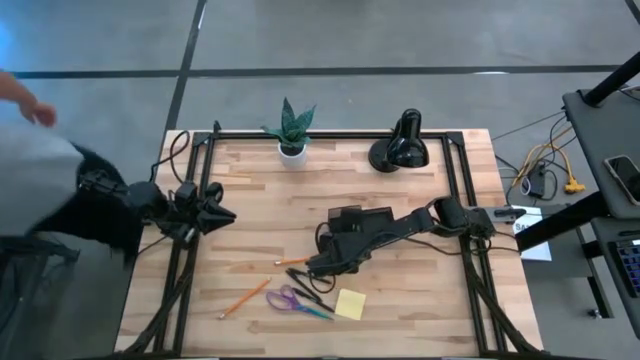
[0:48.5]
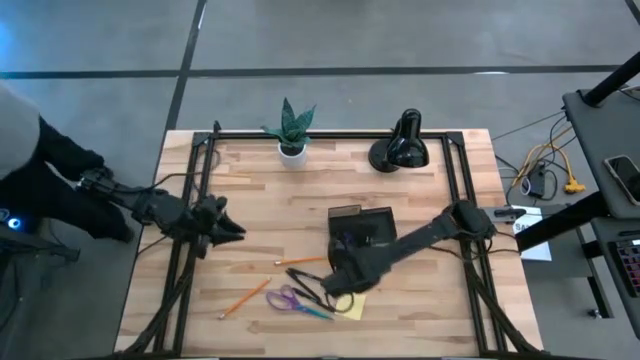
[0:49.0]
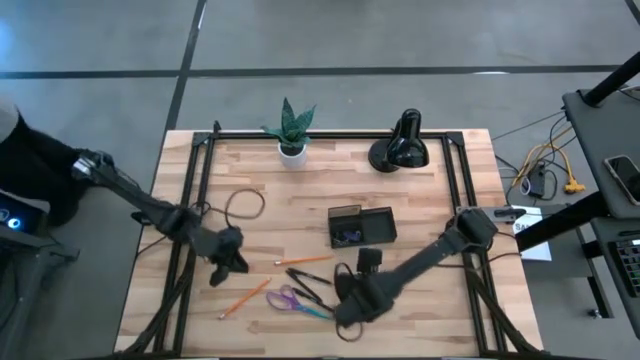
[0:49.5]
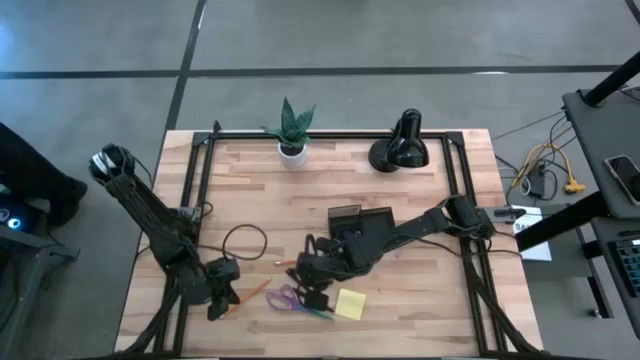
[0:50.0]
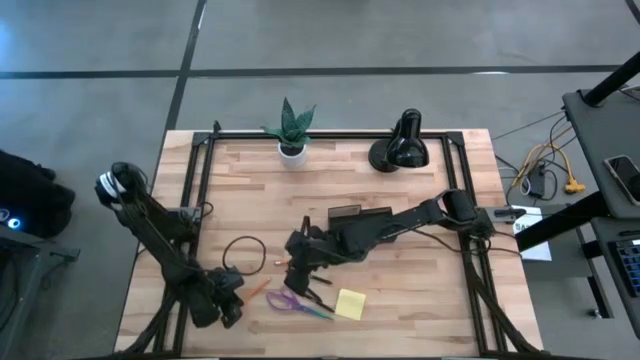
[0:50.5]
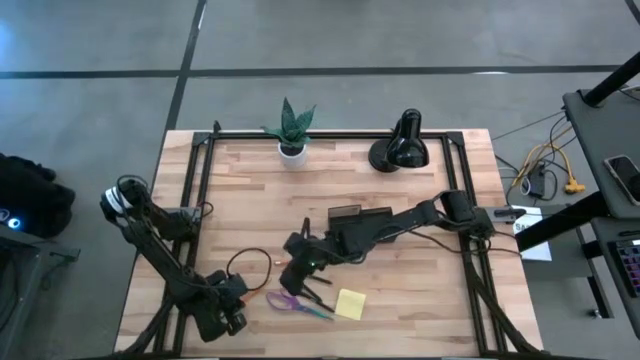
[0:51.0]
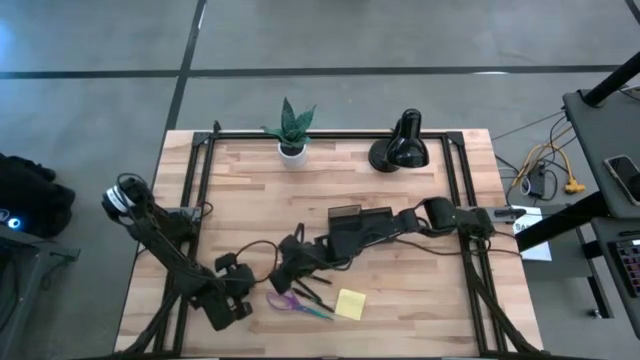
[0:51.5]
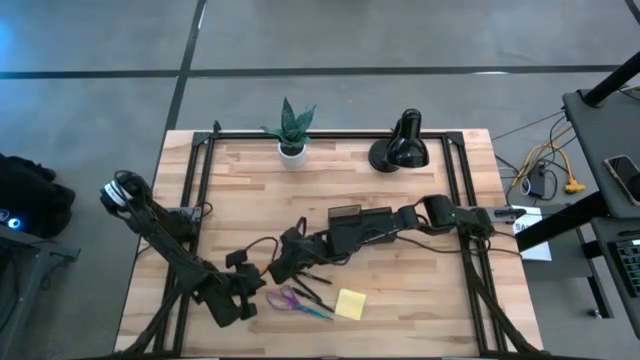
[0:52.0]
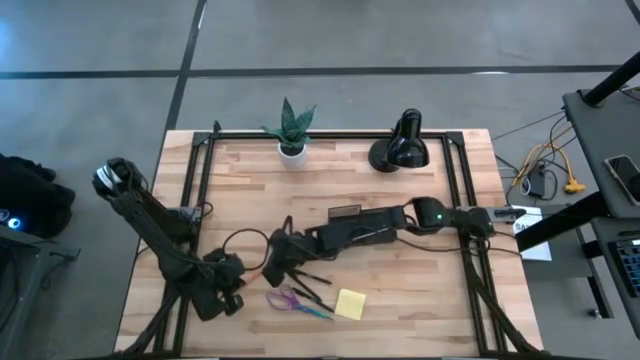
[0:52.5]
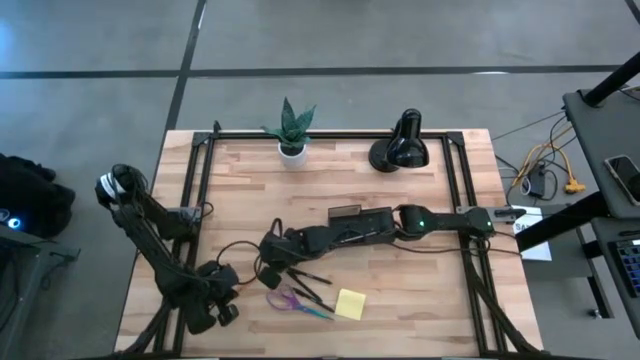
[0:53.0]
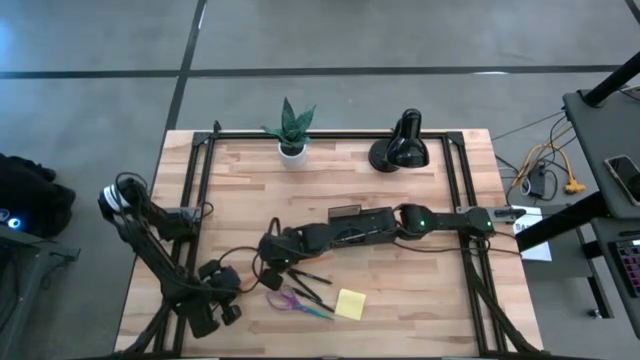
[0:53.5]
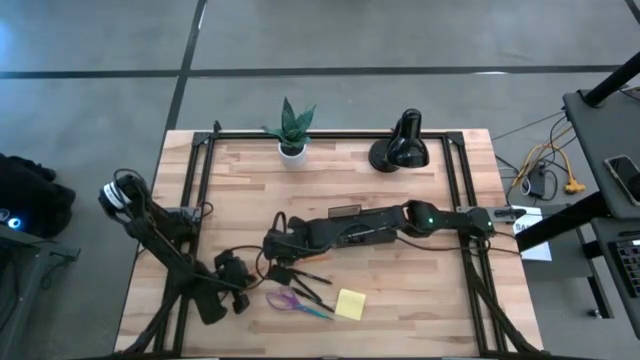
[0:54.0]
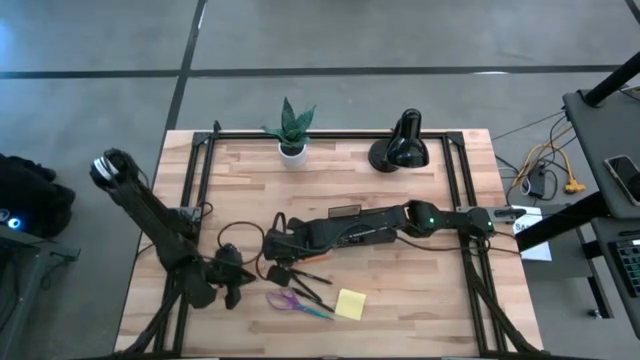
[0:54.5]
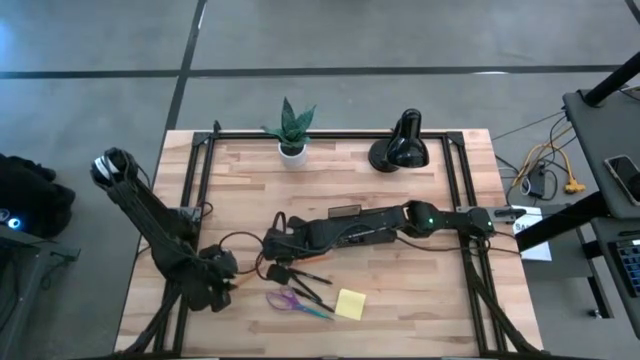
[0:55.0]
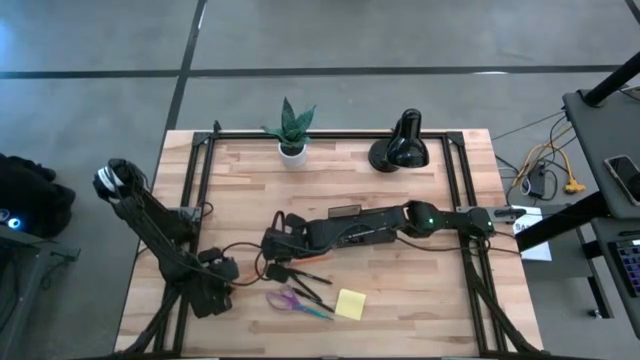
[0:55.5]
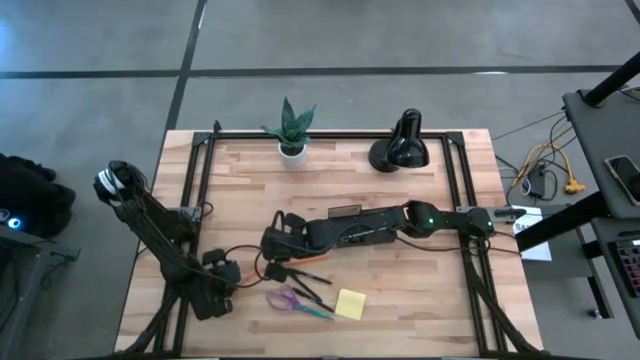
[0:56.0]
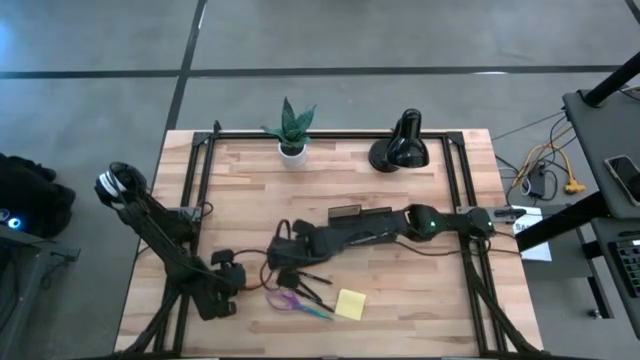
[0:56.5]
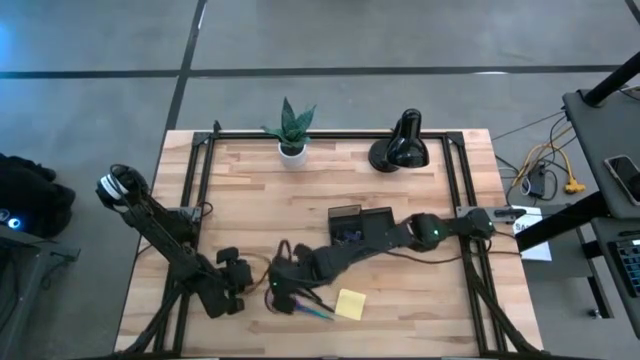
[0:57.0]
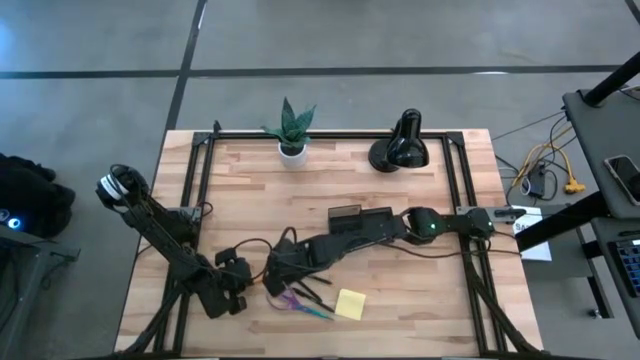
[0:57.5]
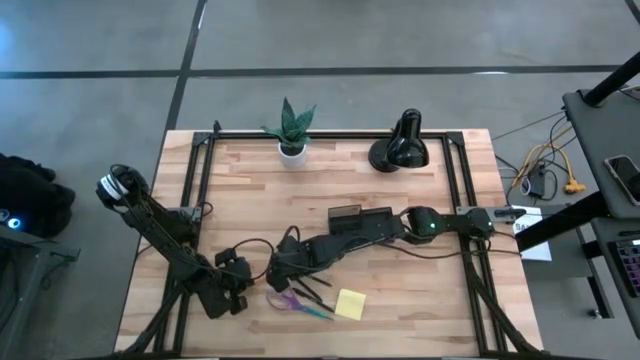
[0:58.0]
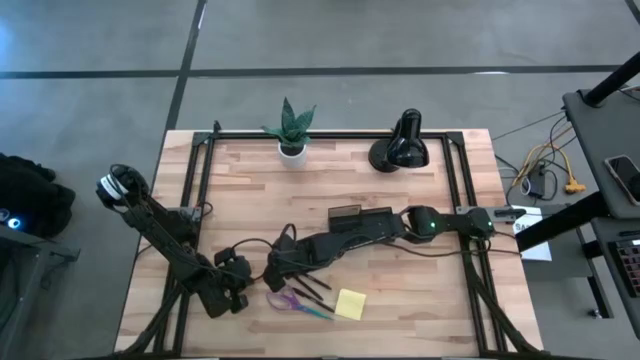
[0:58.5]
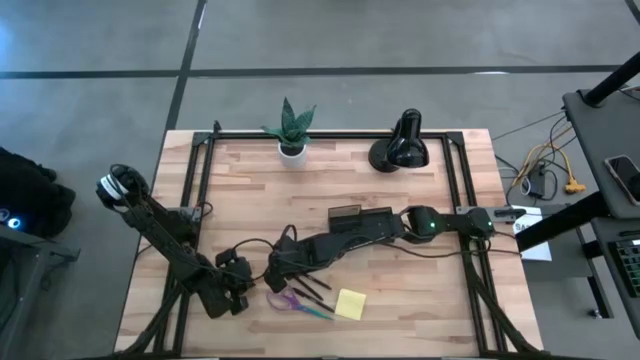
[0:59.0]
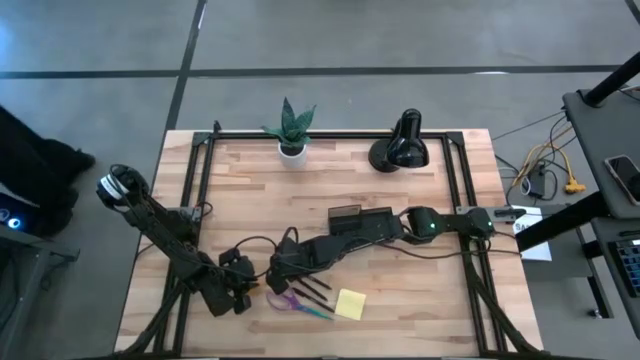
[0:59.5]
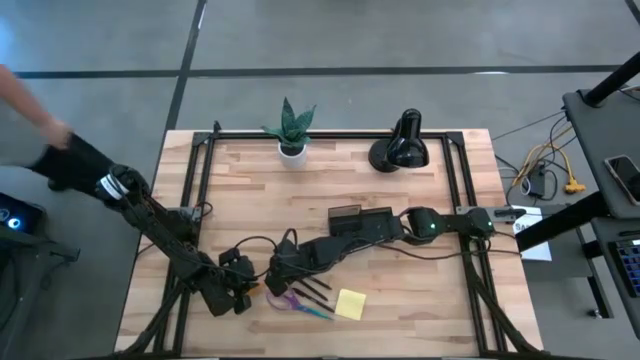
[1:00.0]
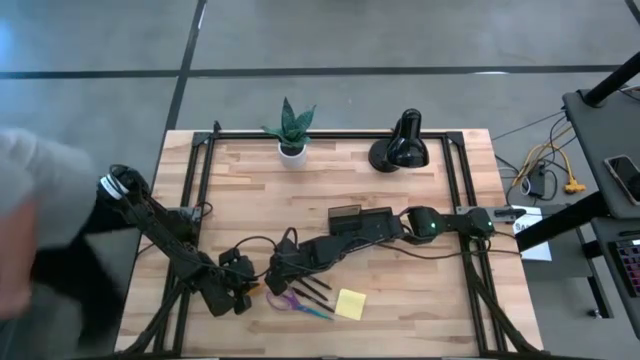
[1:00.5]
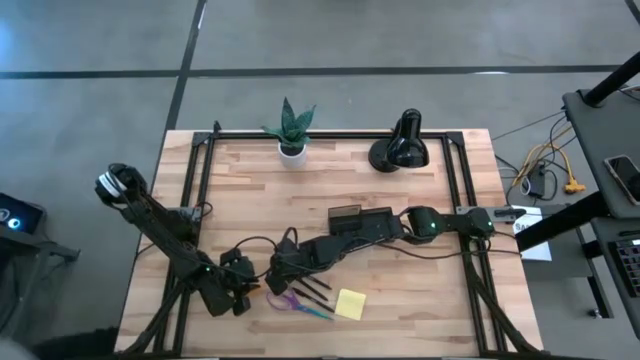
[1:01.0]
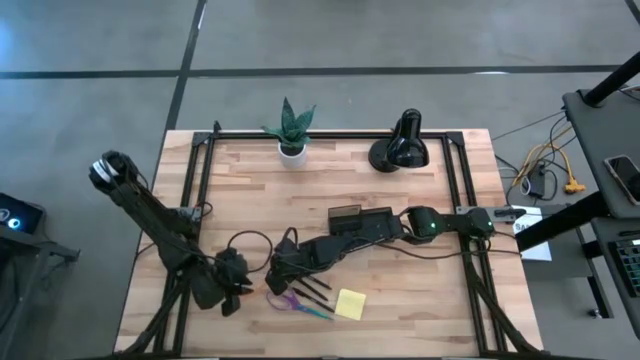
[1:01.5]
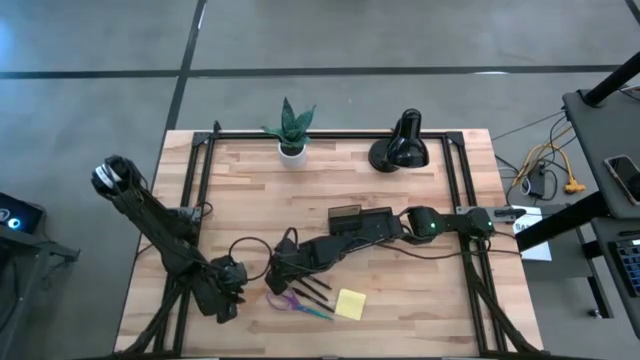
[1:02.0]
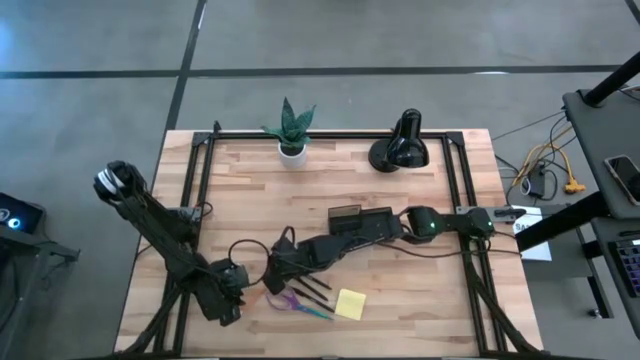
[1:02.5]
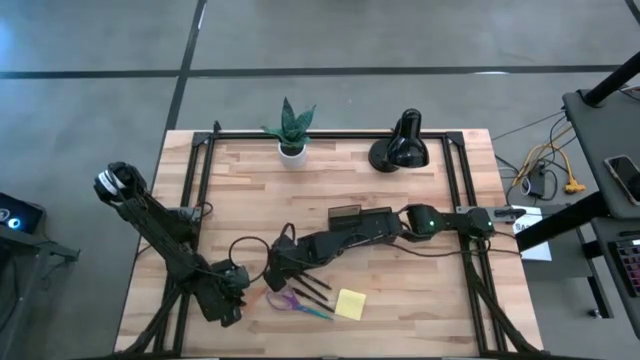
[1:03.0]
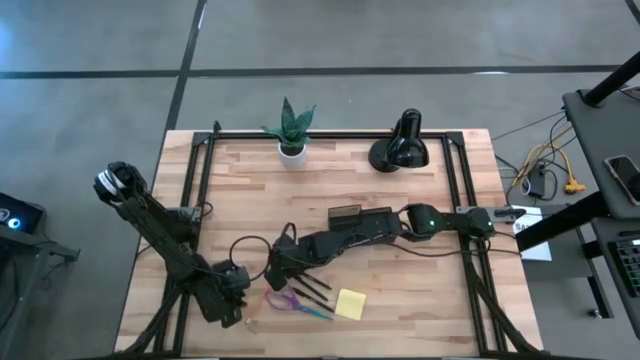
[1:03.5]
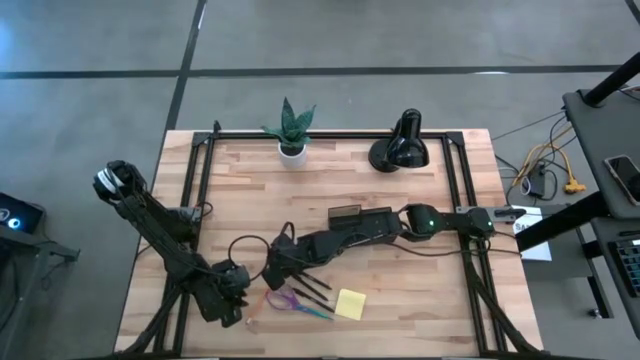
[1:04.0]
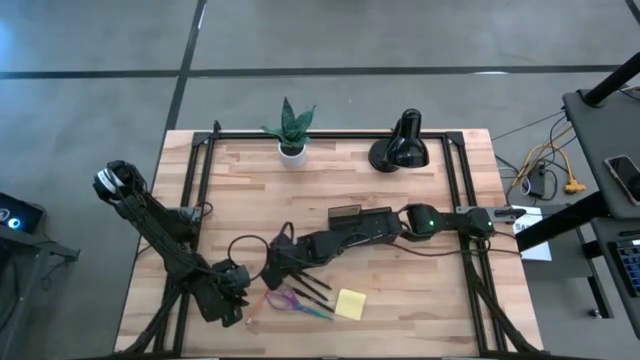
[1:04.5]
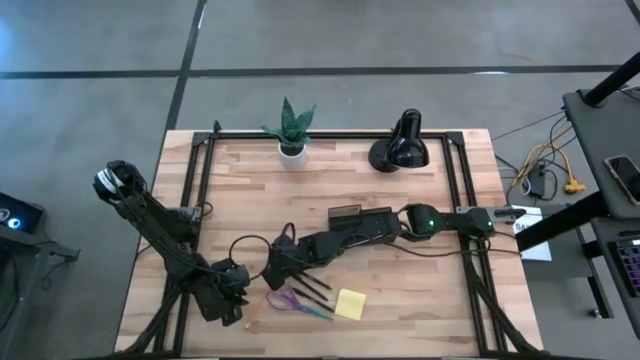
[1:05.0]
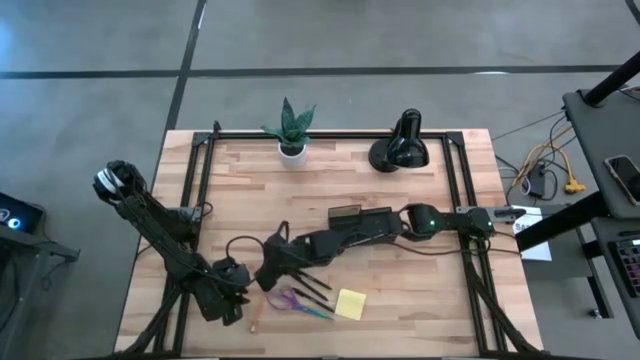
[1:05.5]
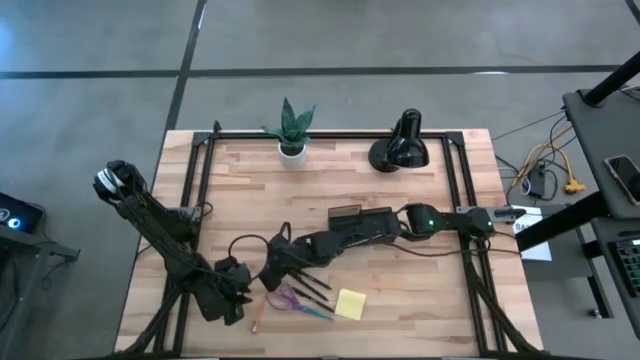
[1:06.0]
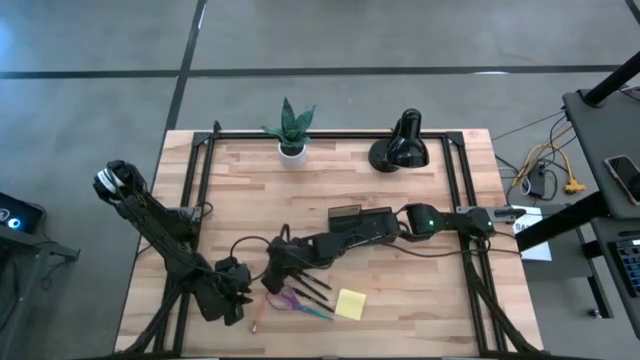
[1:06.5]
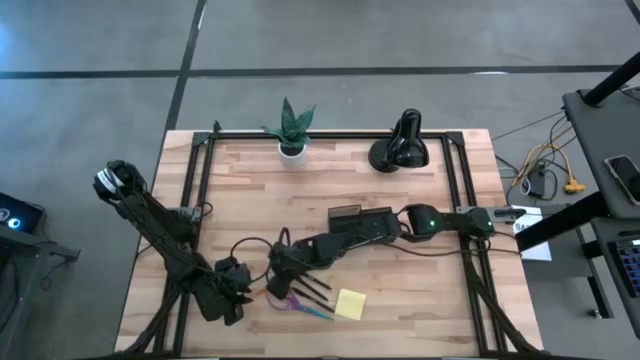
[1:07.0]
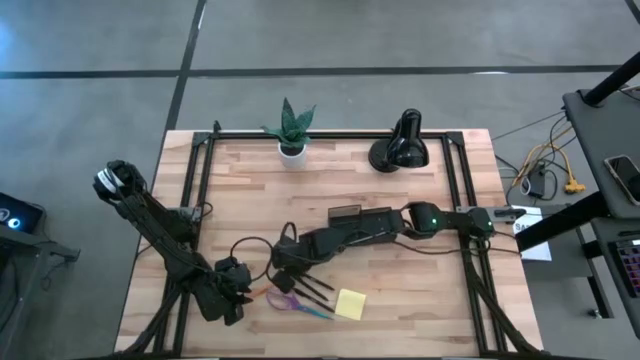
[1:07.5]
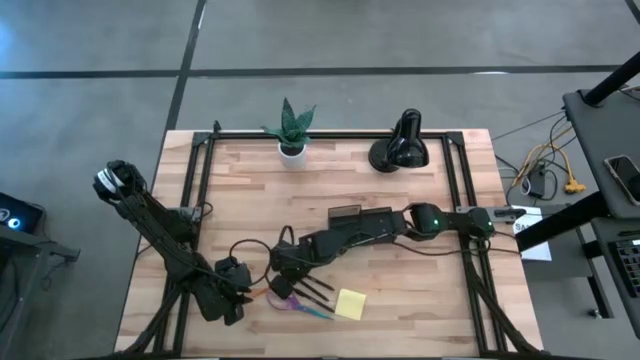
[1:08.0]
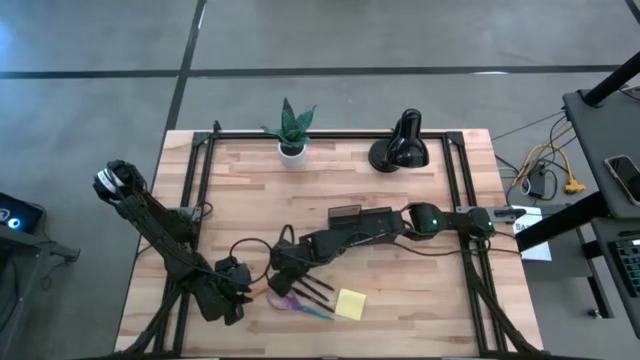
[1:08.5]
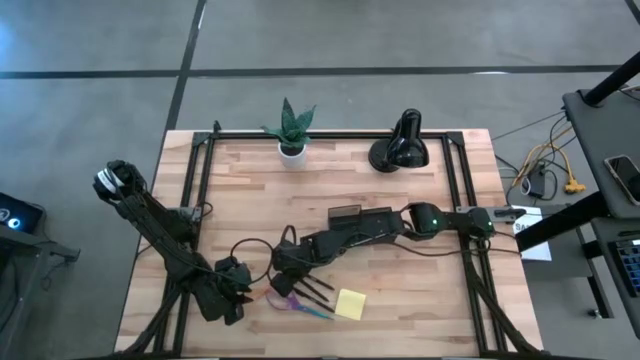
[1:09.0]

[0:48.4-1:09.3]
Task: Pick and place office supplies into organizer
Put the left orange pencil into the black desk organizer

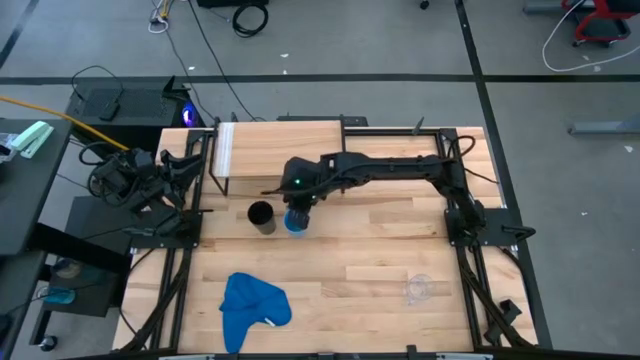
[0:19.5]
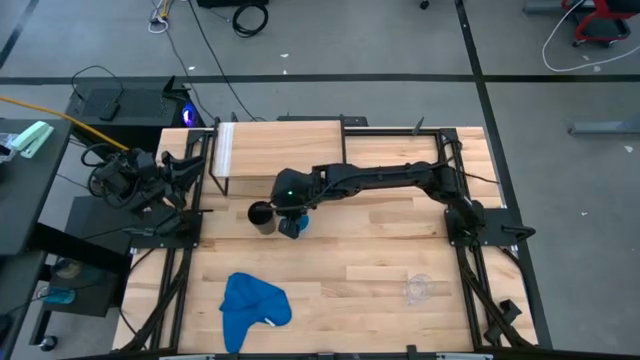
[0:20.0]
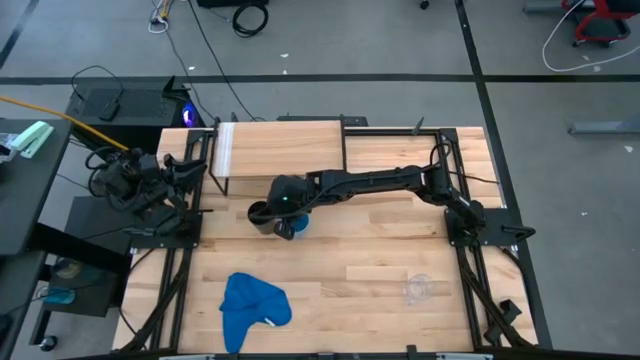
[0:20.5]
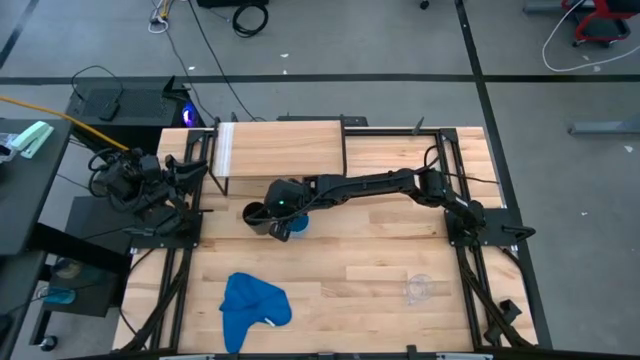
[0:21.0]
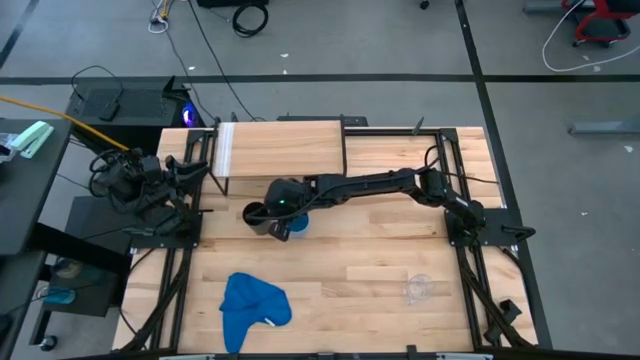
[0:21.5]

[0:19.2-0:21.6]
Task: Stack small to large cups/mugs on shelf
Adjust the black cup
